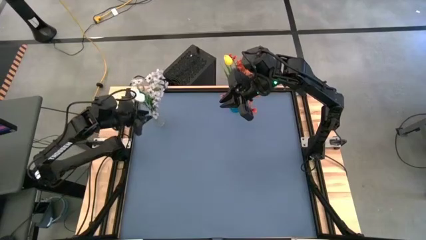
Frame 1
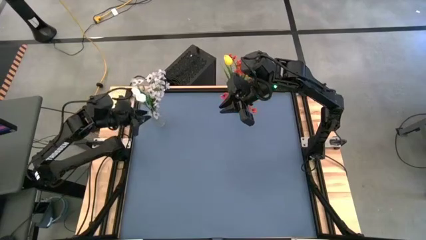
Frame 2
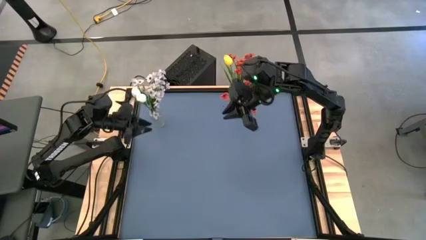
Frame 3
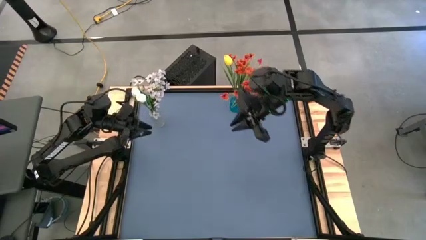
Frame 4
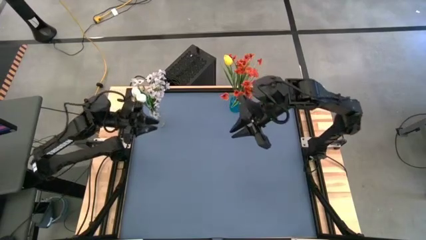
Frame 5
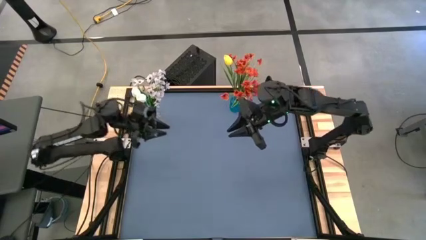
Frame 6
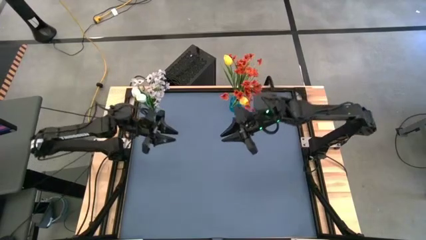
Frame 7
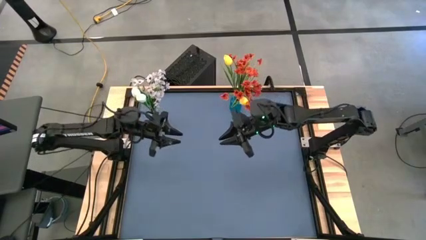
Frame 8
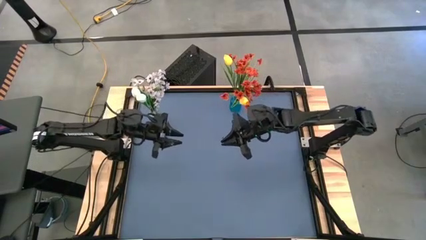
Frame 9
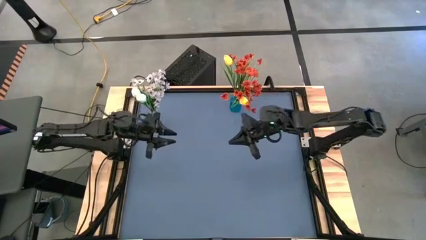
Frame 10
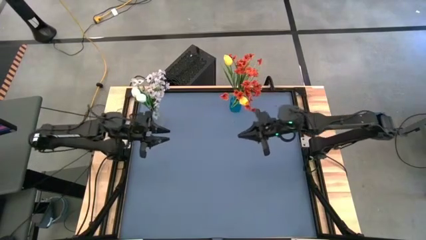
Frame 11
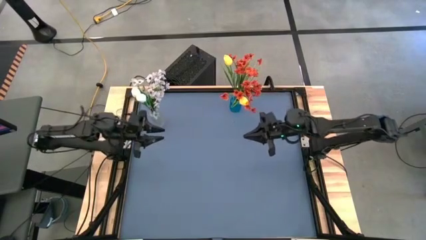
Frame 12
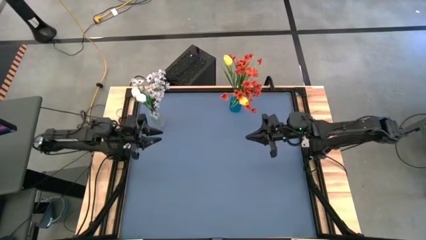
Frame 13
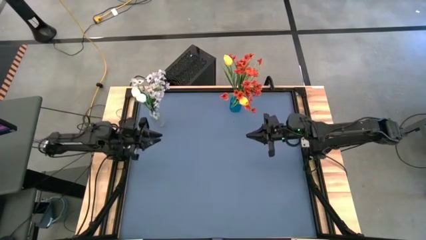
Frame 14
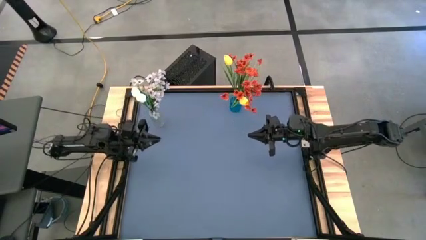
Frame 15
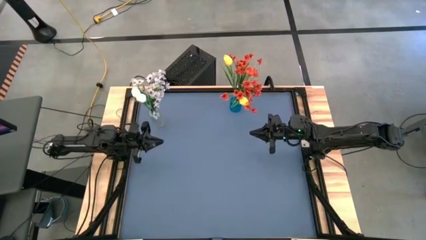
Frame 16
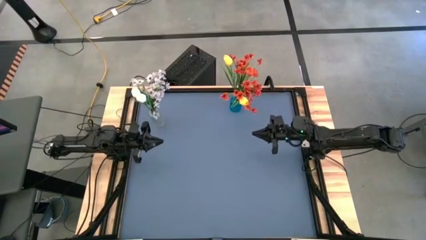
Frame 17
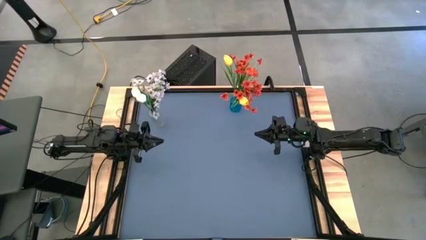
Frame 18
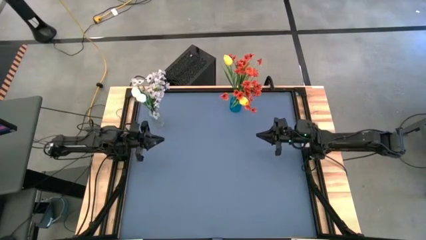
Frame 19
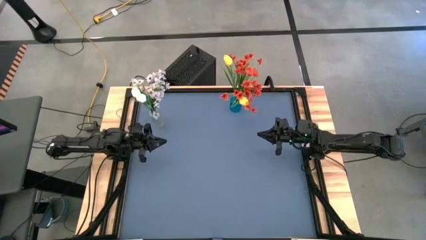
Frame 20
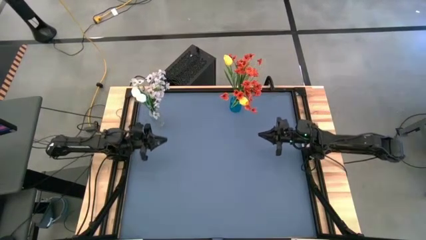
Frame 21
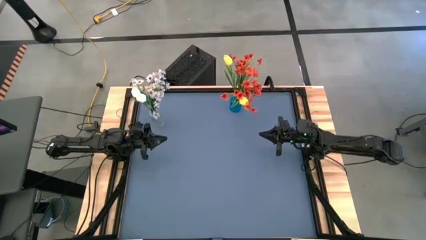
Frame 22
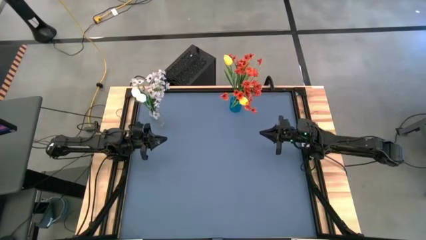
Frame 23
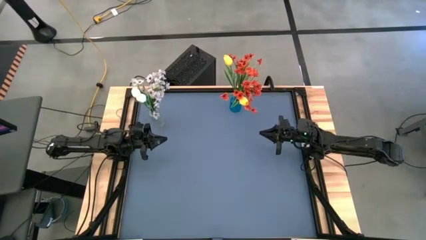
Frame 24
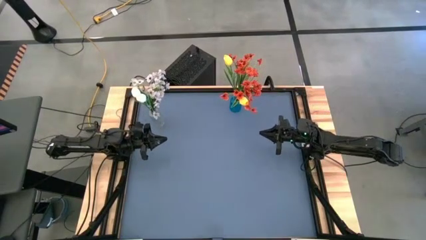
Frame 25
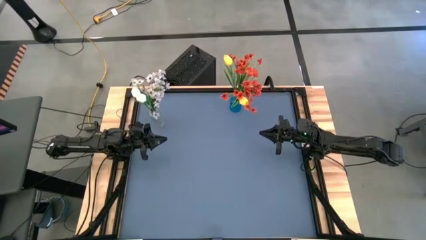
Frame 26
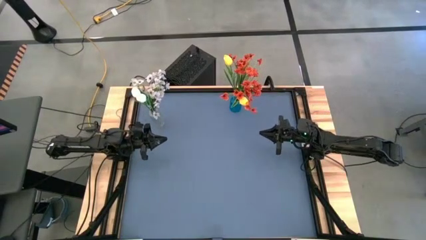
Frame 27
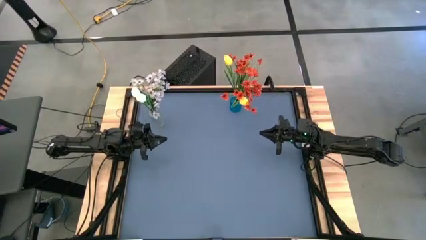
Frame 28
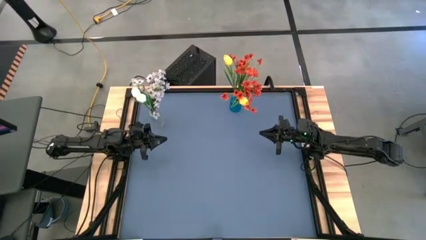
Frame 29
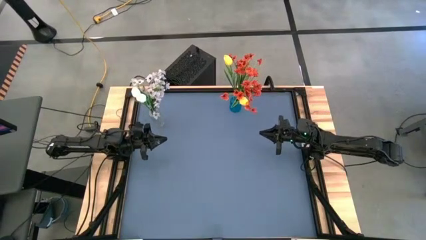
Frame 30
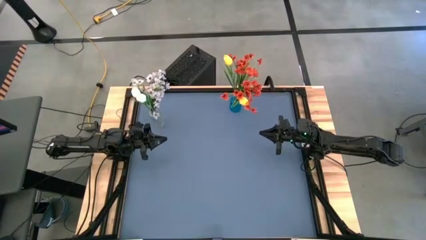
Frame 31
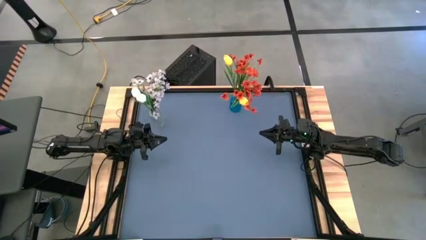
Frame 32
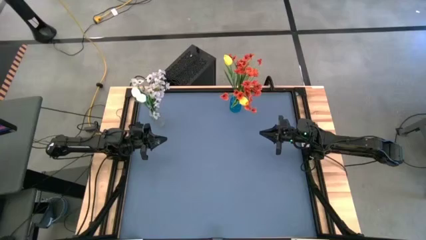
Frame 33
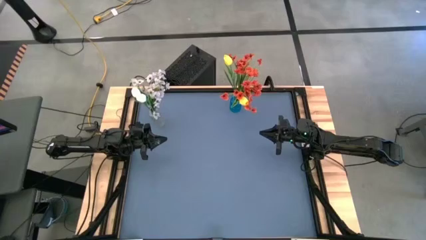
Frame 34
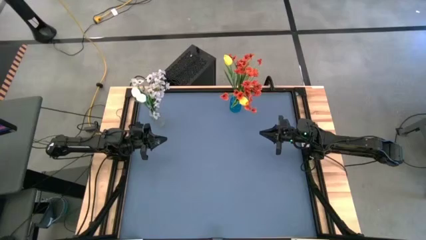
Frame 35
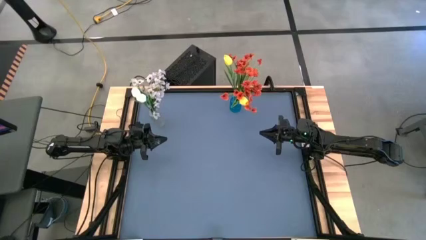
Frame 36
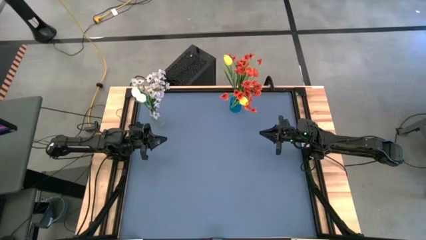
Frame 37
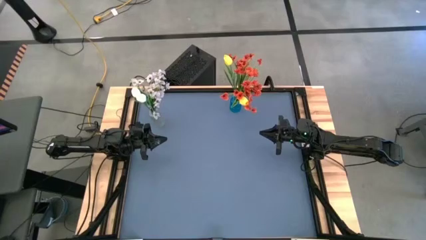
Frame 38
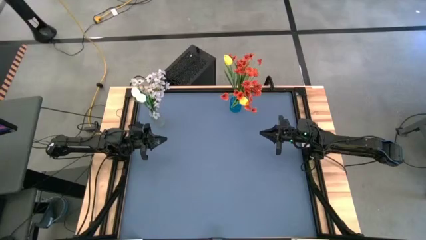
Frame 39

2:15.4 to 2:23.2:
Task: Sort flowers into vase by color
Return to Home Position

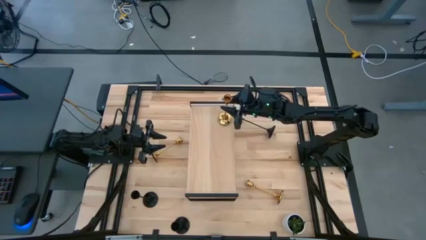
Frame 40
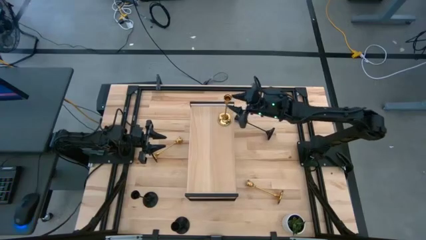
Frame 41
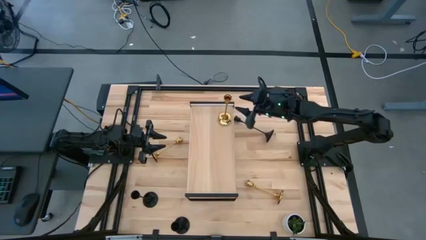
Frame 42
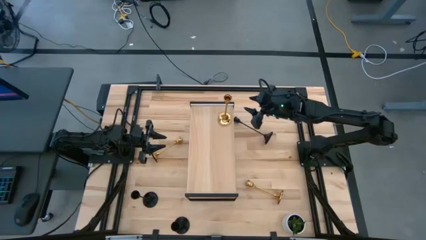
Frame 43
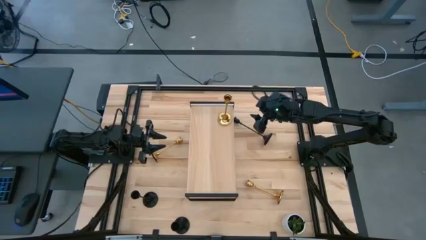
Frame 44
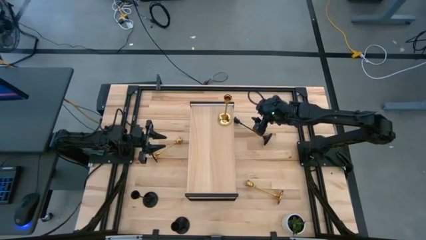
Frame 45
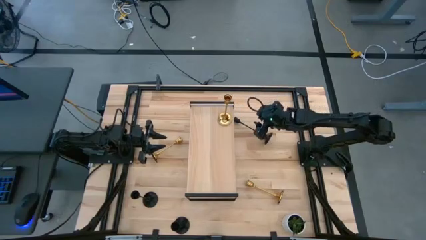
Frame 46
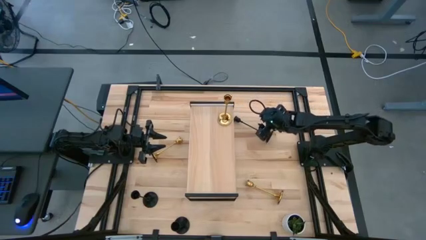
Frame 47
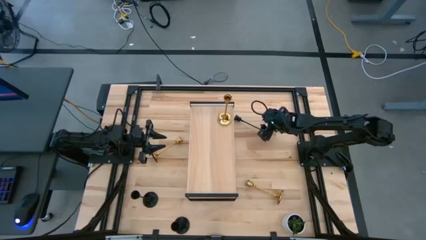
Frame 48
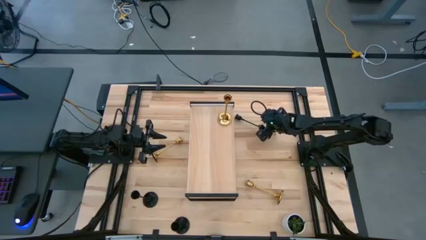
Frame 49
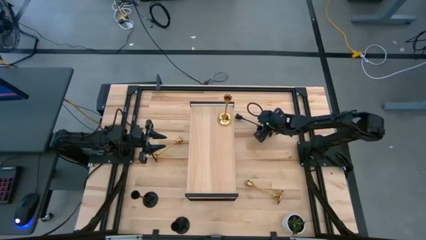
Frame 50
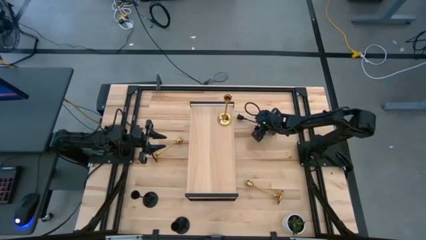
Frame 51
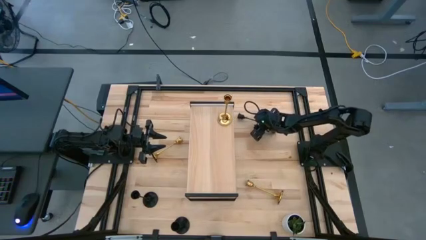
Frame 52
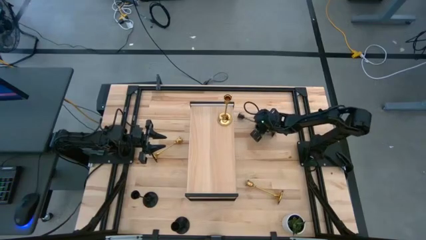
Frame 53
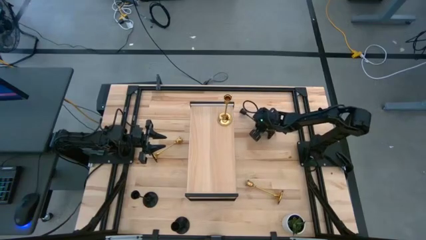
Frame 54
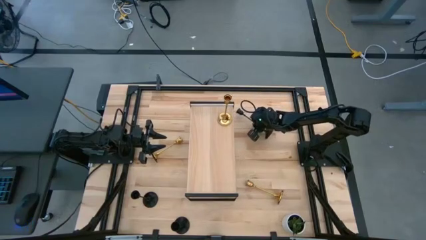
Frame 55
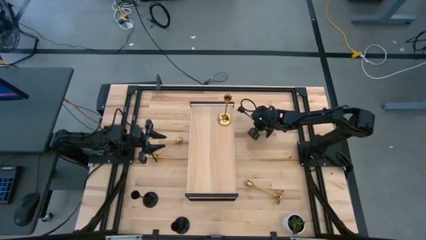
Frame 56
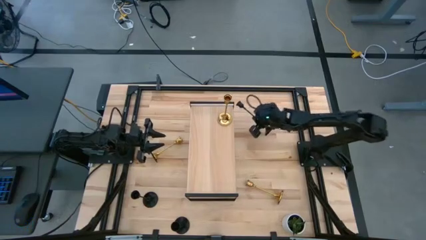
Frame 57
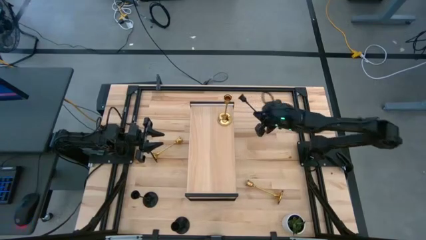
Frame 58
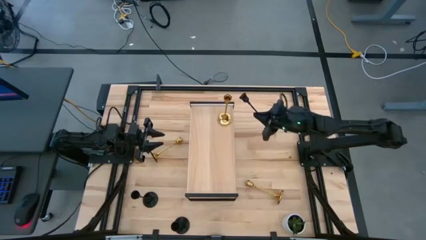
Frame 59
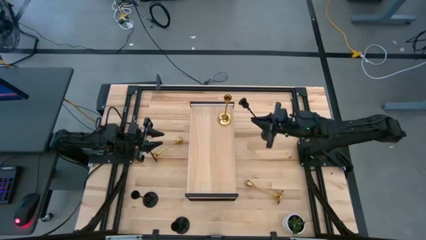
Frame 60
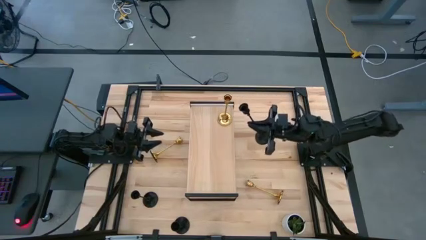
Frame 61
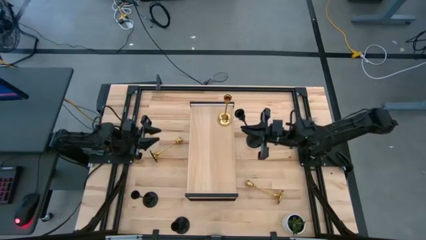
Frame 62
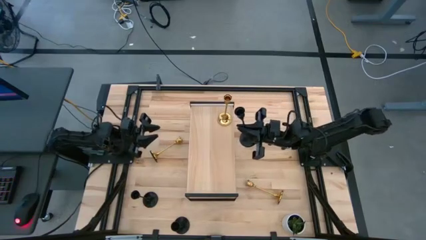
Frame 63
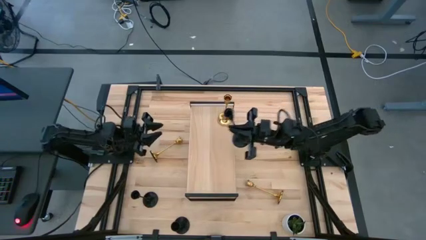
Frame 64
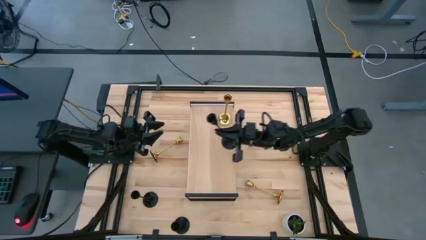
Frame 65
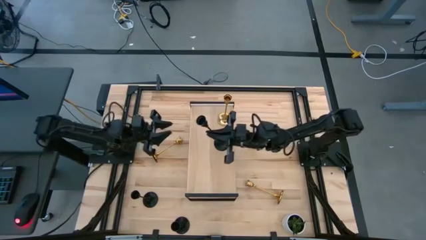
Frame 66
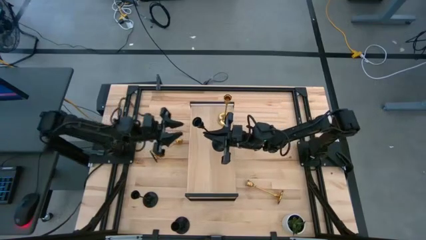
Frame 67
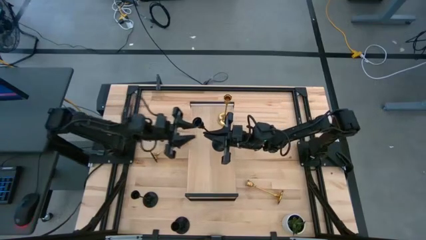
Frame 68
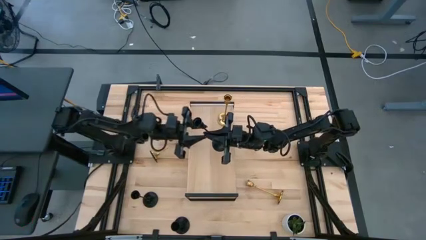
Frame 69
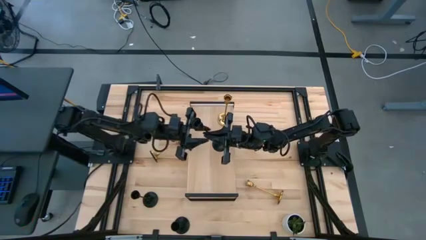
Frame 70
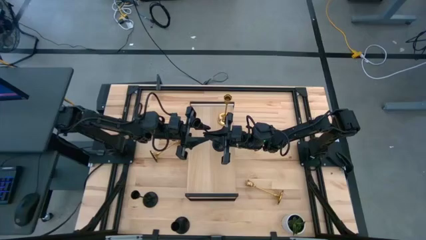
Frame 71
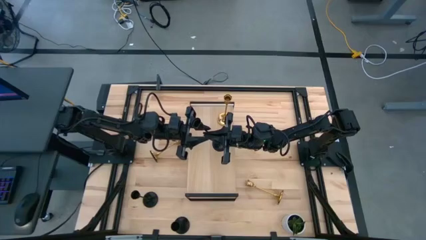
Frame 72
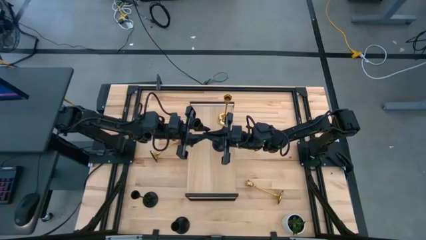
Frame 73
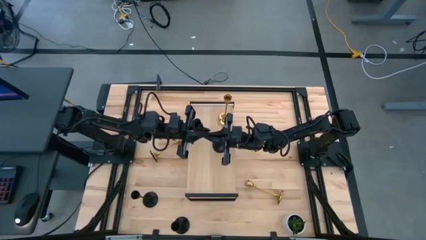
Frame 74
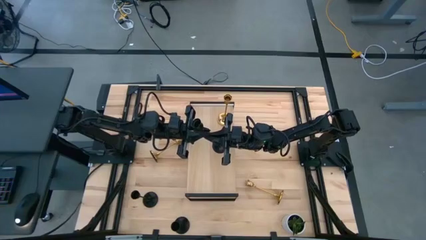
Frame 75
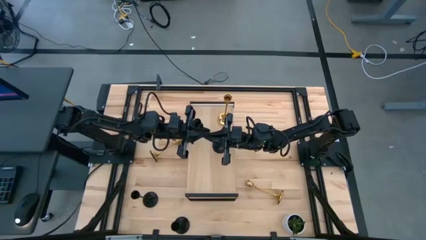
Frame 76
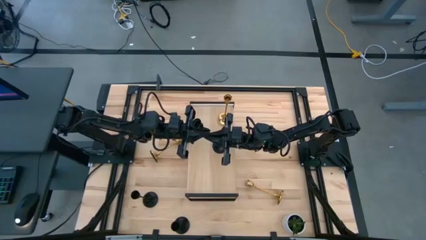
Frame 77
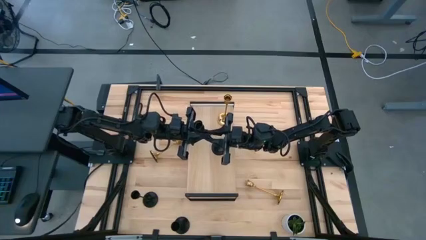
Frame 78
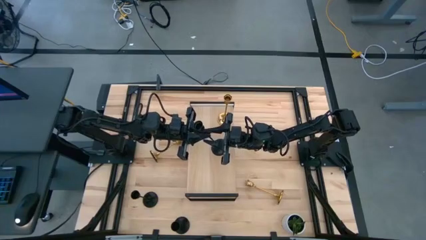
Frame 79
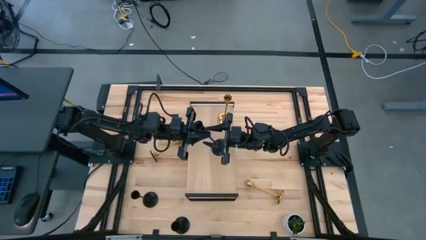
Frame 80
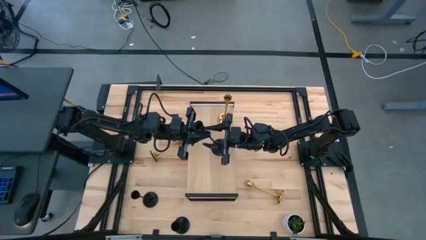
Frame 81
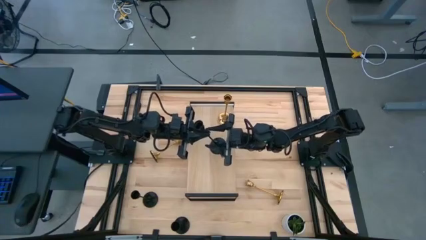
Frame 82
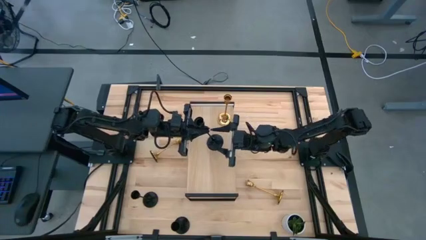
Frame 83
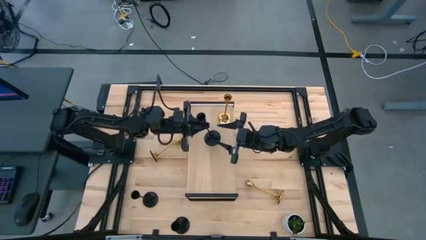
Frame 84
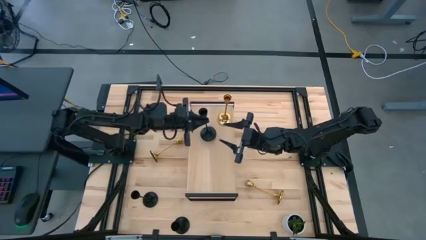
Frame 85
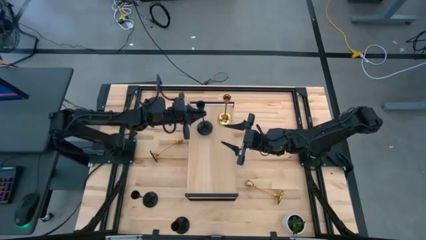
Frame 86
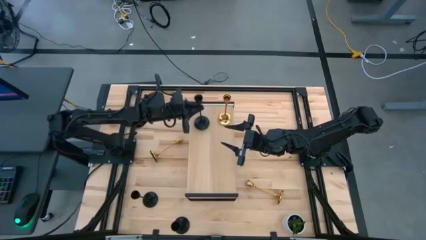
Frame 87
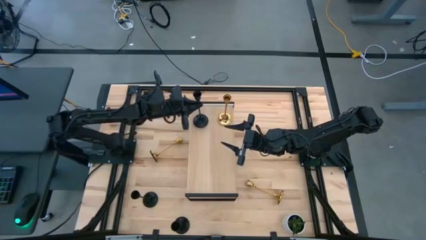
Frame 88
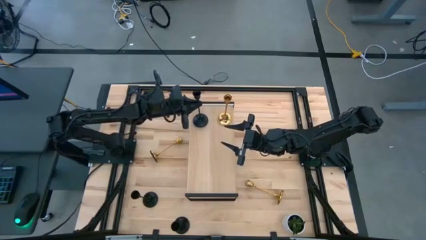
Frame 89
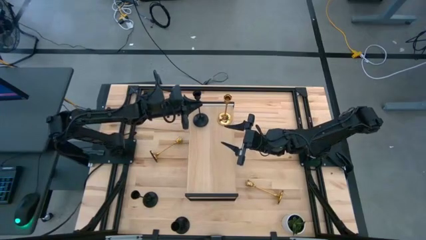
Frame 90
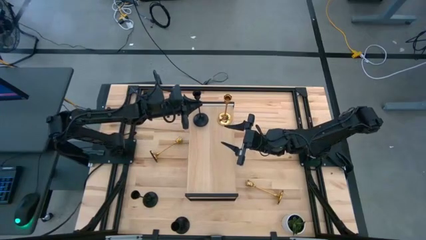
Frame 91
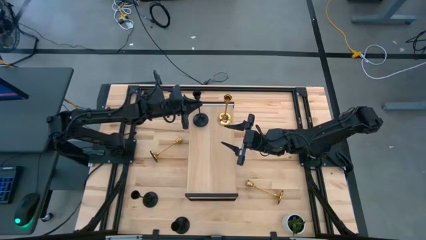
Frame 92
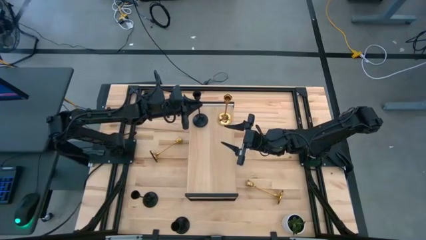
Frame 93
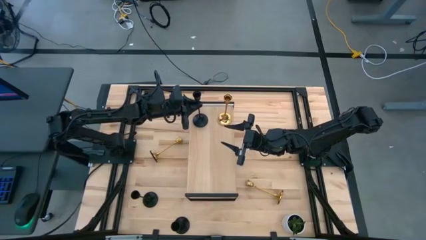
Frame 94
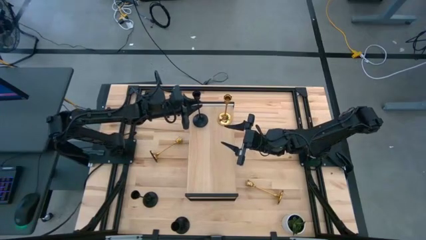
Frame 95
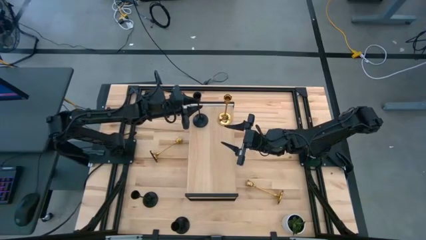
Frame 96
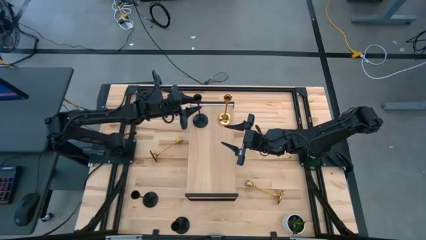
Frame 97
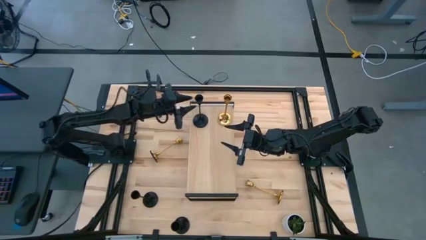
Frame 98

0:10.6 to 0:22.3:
Task: Pick & Place candle stick holders
Put the top black candle holder on the shelf
